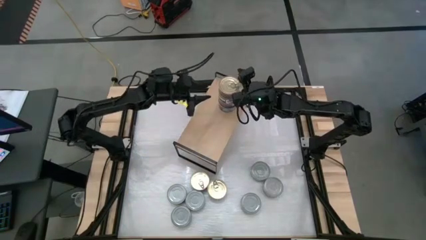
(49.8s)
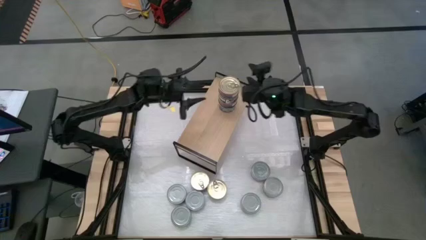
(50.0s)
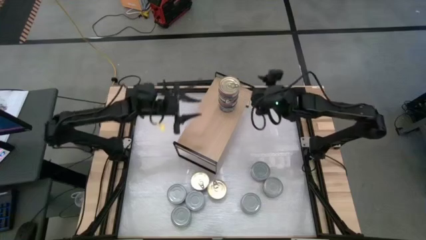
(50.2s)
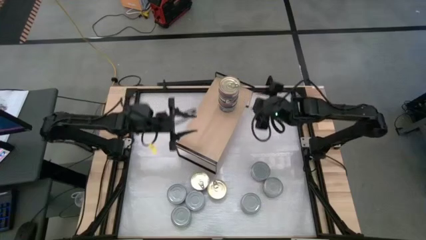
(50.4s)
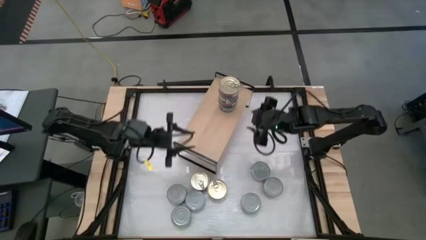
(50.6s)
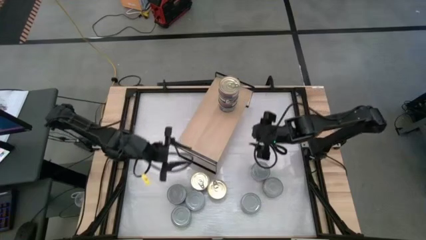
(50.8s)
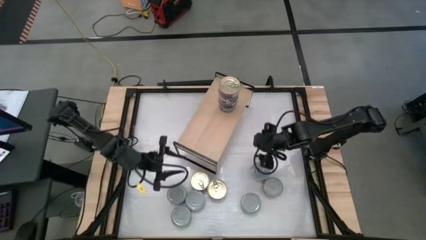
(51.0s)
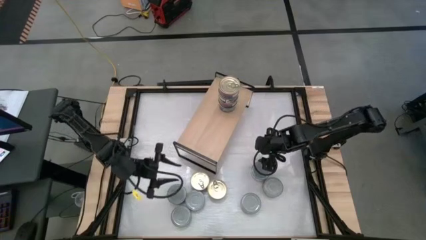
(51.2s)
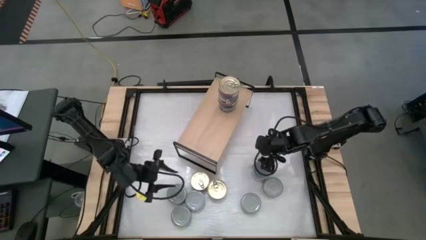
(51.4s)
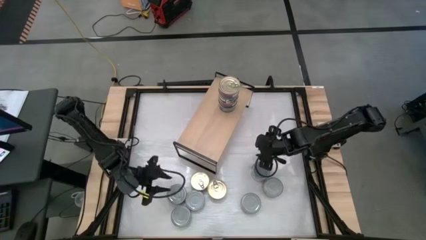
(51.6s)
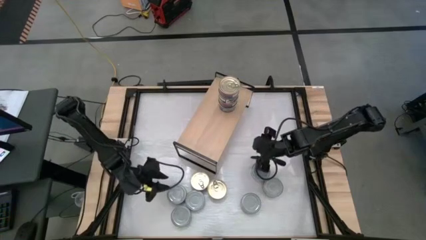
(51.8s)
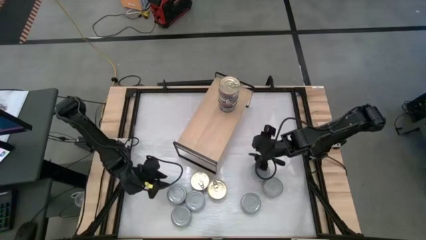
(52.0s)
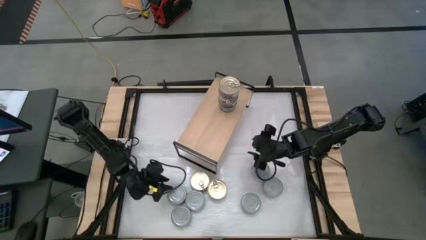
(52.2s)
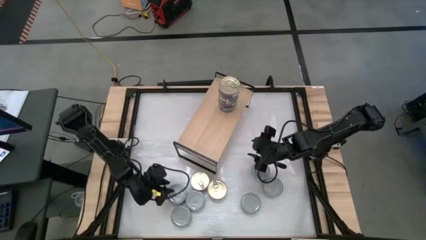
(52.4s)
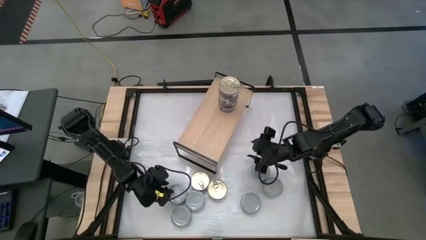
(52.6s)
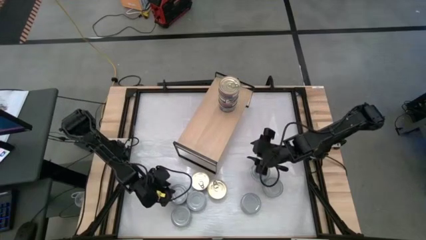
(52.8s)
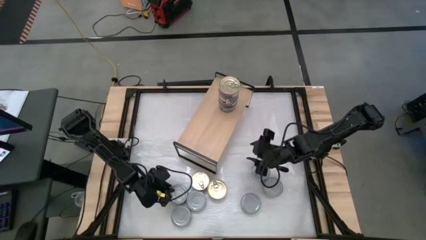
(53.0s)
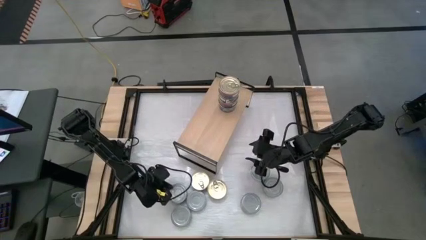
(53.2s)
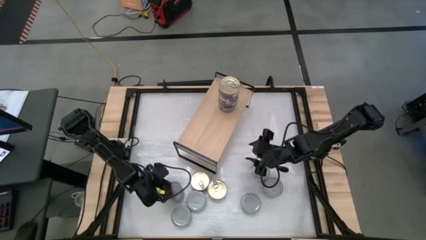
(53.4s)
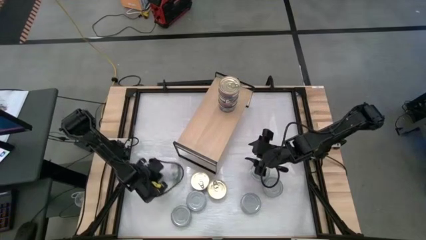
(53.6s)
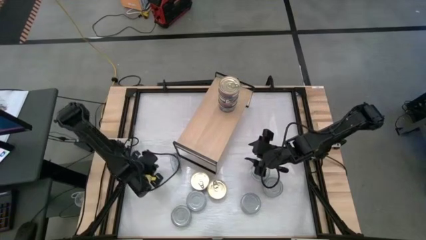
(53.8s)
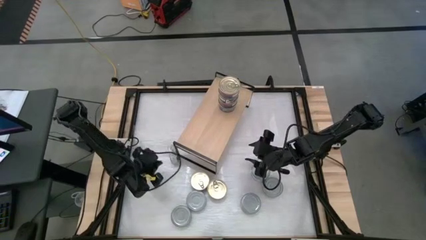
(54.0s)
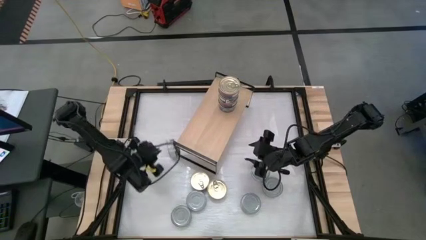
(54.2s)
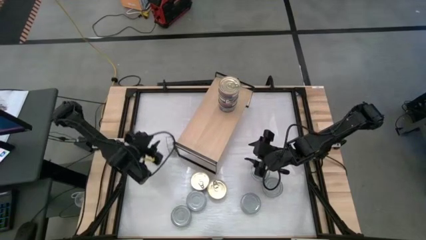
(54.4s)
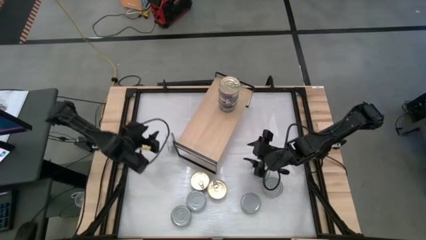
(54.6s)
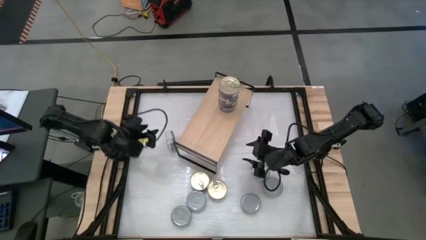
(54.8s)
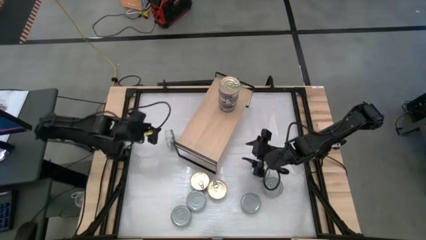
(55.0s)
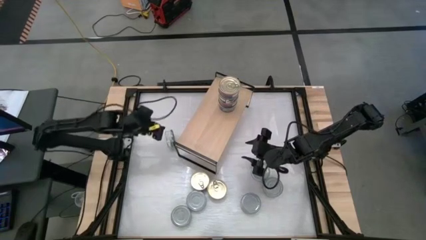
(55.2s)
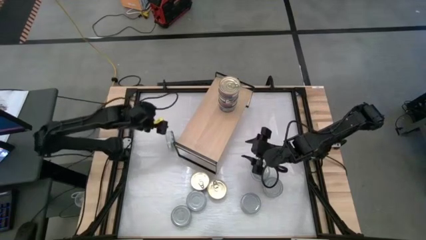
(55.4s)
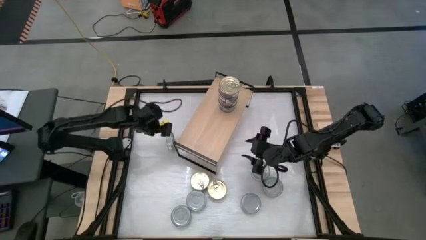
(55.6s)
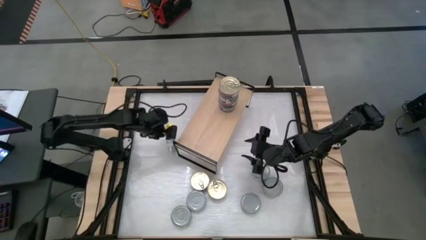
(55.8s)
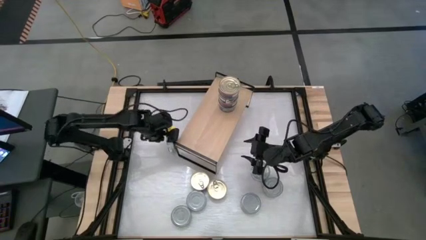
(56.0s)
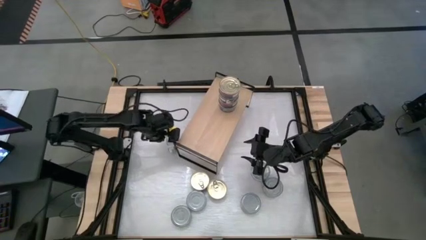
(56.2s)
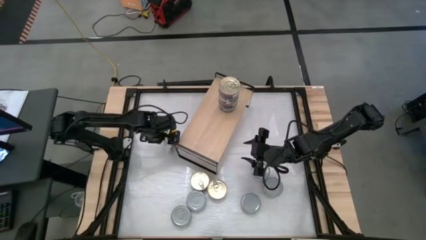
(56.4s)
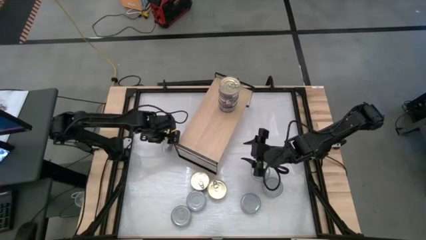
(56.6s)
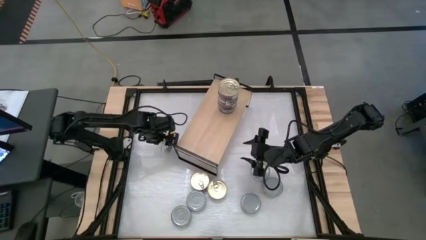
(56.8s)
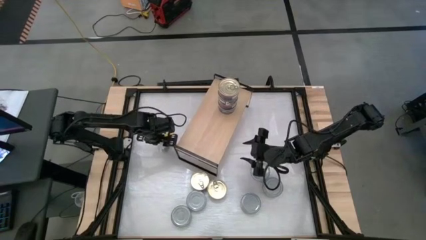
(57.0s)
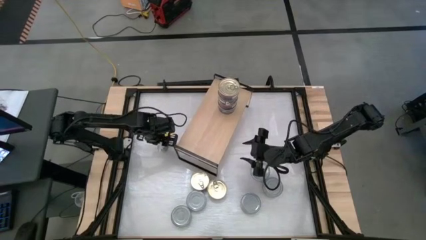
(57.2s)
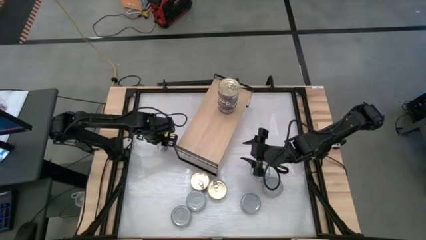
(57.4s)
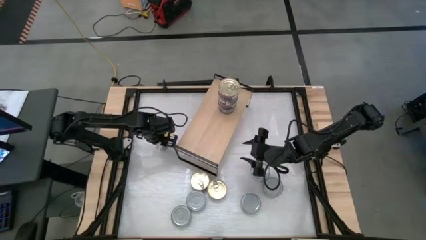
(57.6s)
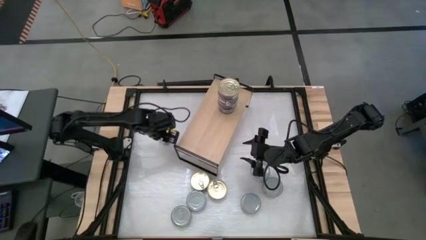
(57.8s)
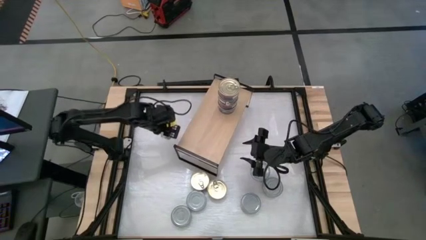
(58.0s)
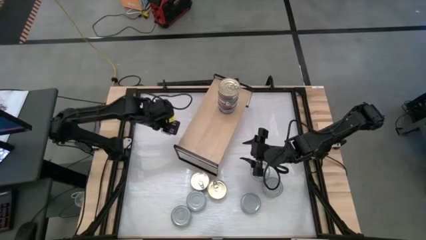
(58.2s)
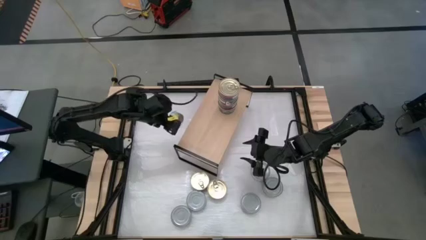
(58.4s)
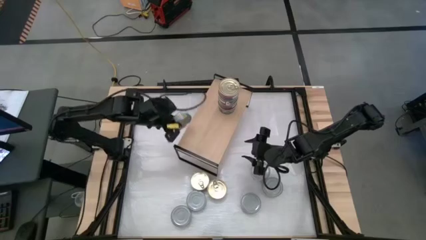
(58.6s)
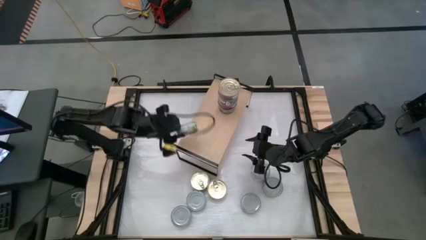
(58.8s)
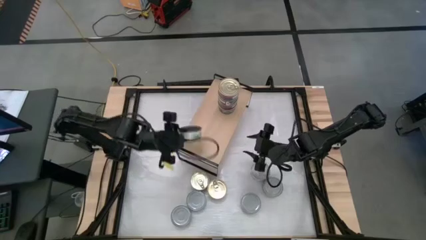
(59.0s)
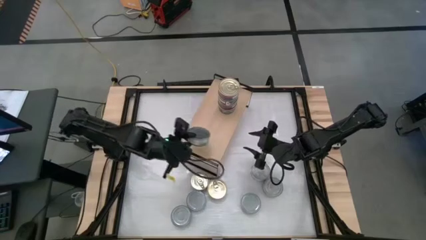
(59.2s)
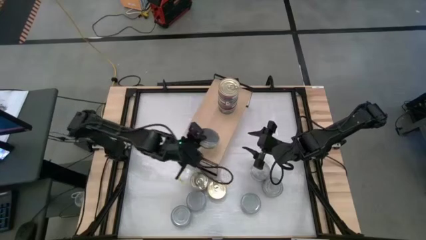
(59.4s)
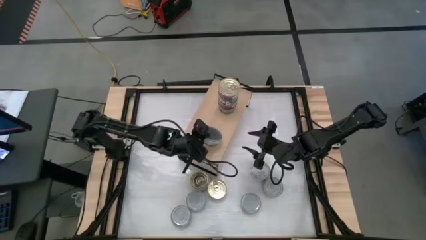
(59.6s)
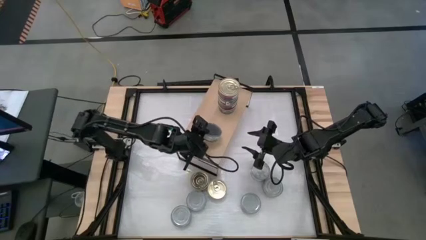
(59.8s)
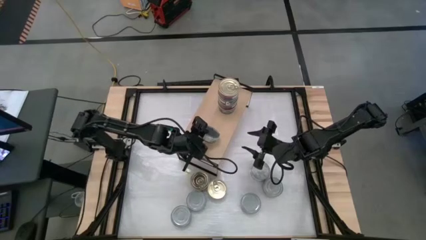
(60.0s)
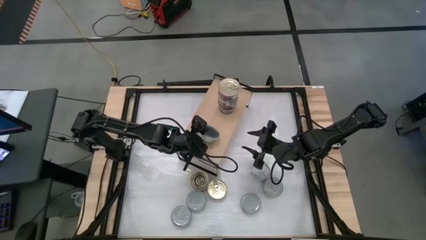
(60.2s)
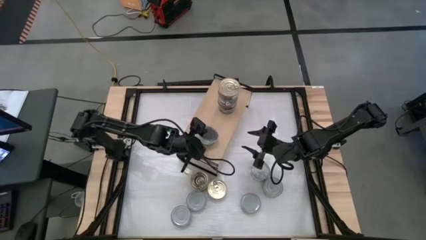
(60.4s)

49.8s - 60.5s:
Task: Stack canned seafood by type on shelf
Put the green tuna can on the shelf

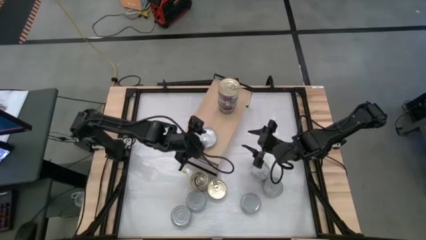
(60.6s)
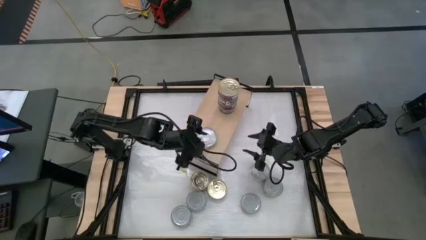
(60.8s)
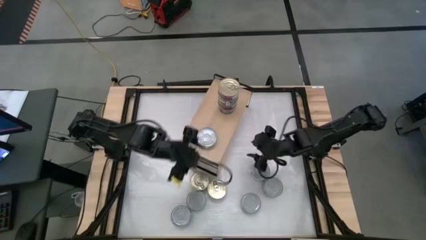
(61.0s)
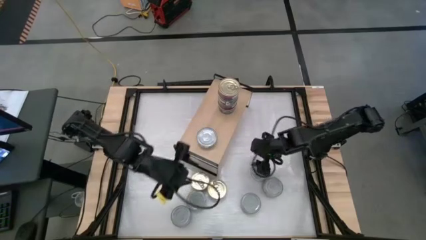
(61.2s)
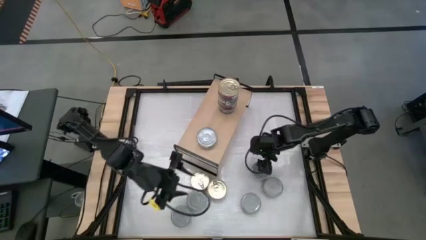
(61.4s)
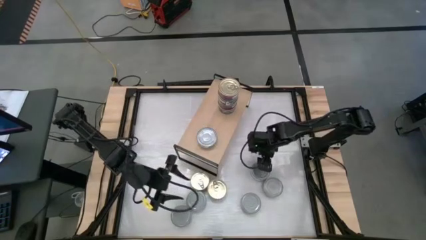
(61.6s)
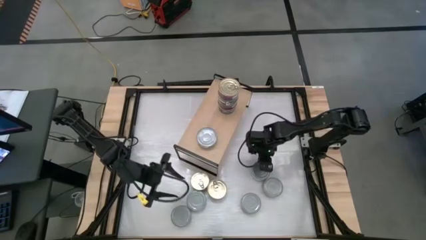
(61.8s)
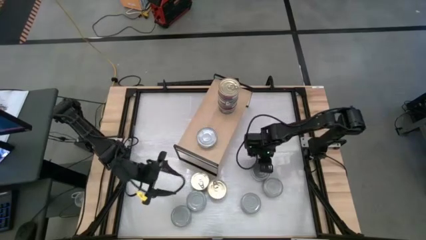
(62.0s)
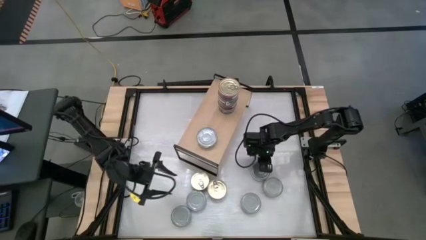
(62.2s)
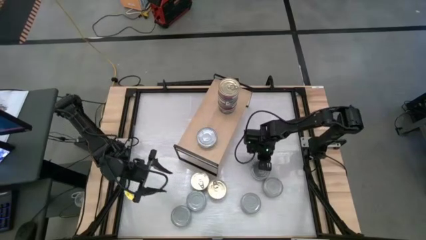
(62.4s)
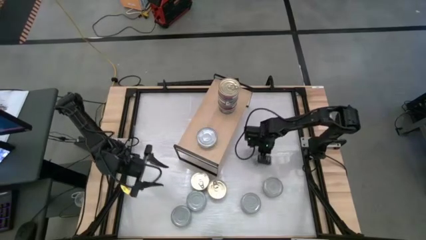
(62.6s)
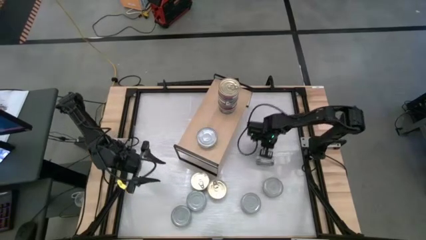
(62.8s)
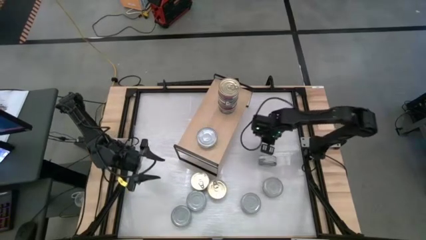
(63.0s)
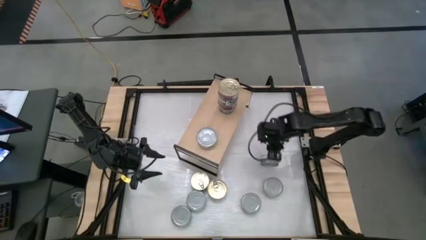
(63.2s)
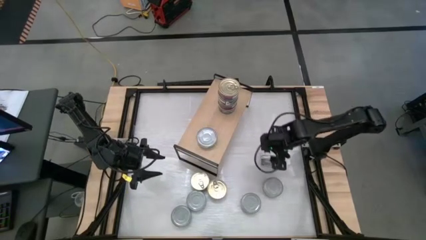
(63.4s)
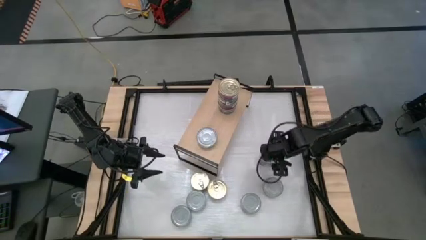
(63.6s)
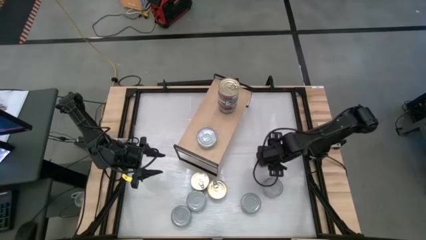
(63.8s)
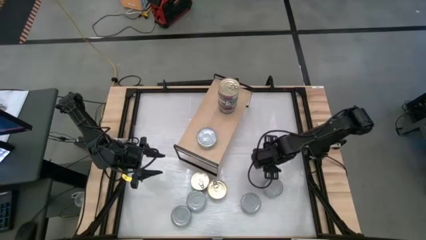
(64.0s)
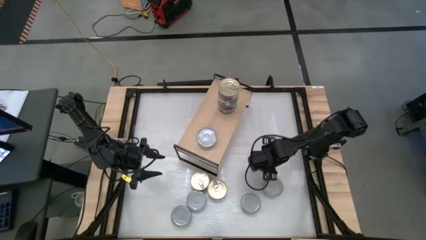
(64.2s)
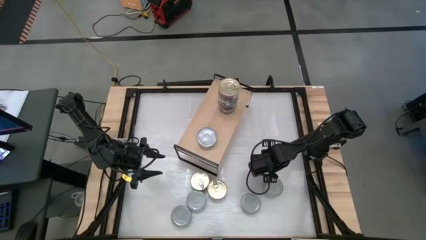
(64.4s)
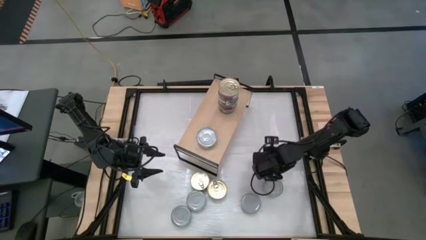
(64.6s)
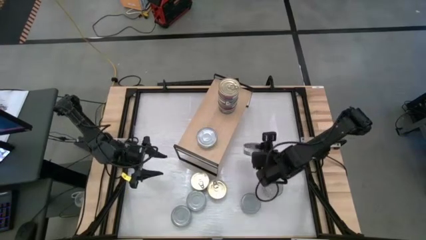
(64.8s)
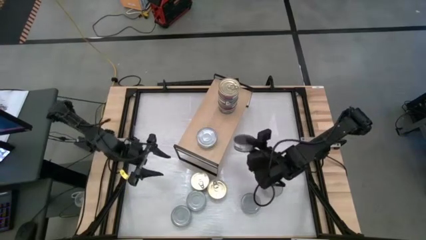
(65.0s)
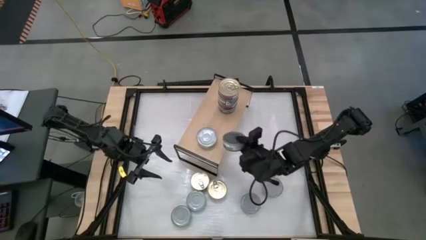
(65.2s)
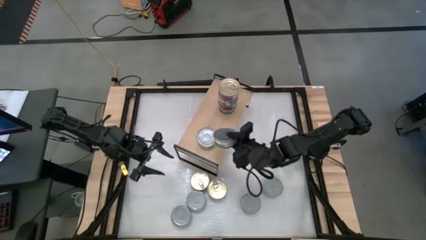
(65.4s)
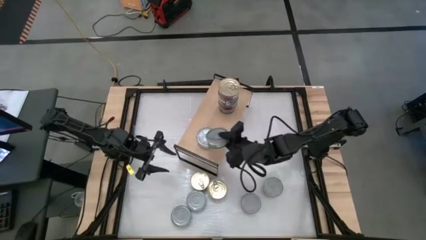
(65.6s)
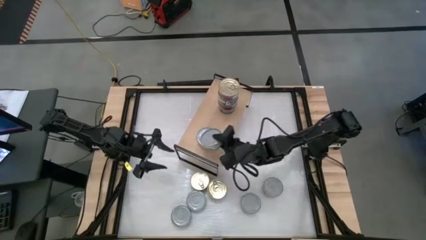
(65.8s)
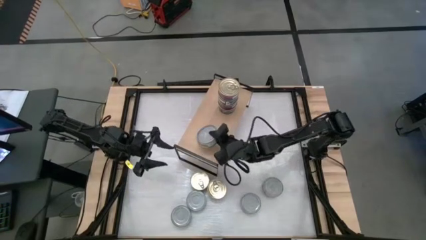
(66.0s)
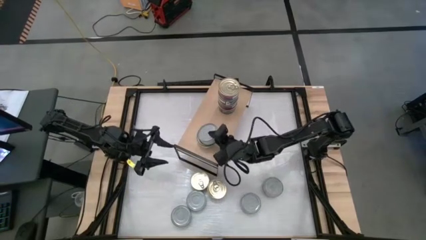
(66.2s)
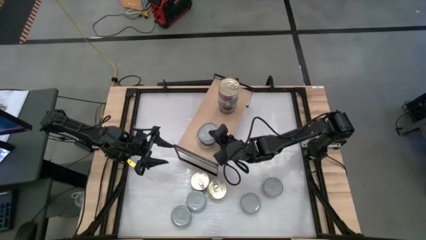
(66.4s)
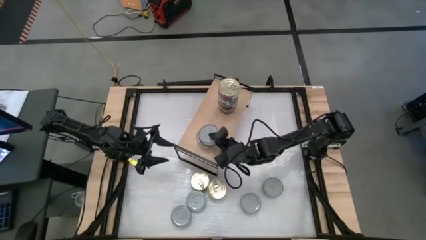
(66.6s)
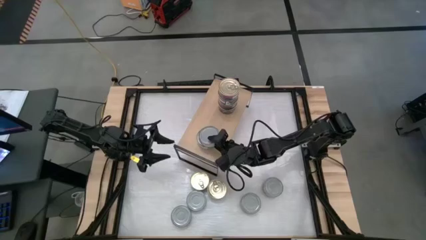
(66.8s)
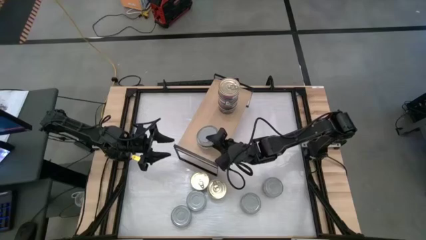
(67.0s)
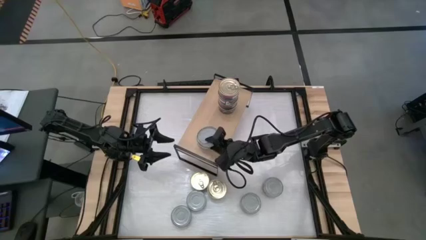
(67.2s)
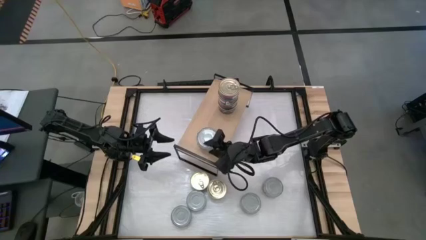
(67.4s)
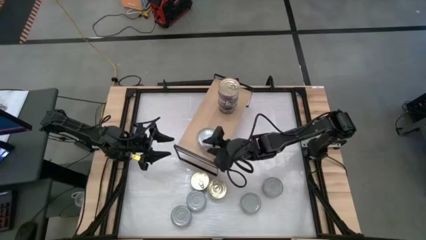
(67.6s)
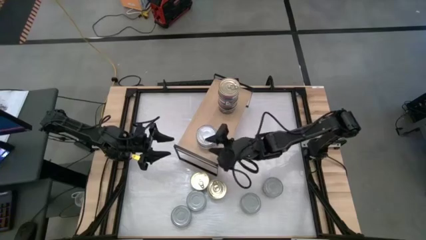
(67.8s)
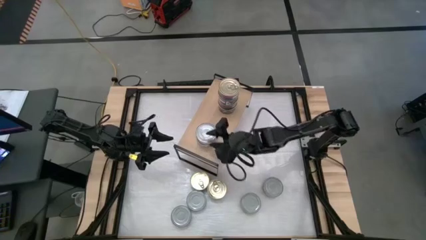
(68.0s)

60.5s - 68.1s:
Stack the green tuna can on top of the green tuna can on the shelf
